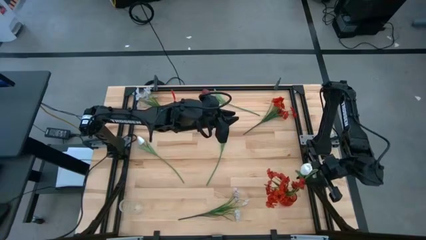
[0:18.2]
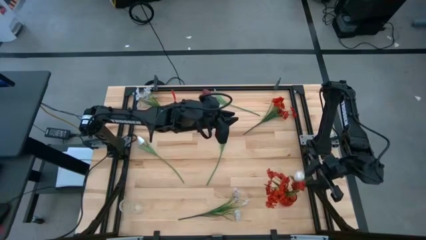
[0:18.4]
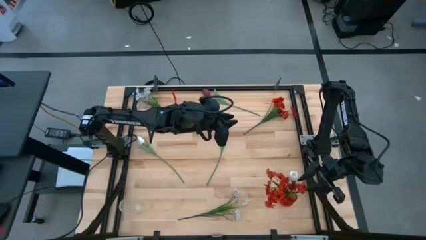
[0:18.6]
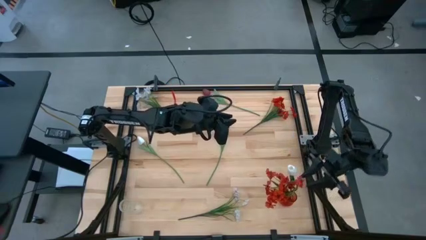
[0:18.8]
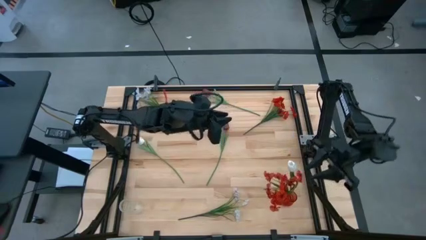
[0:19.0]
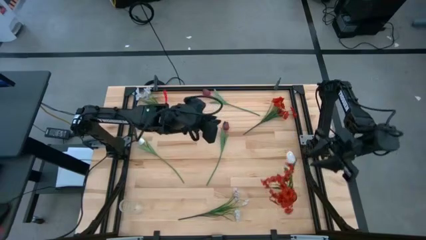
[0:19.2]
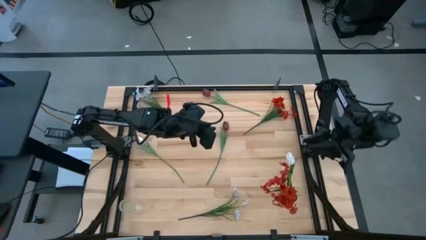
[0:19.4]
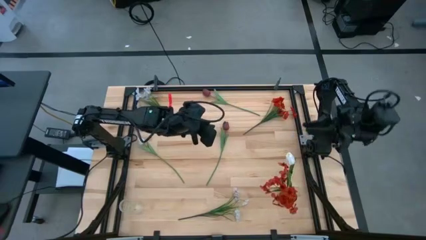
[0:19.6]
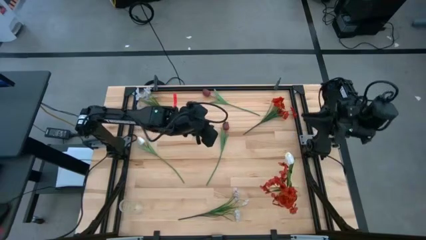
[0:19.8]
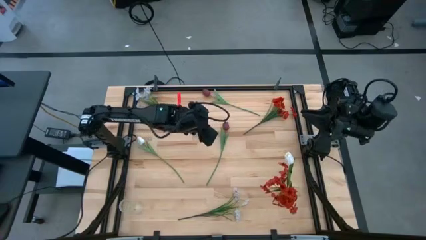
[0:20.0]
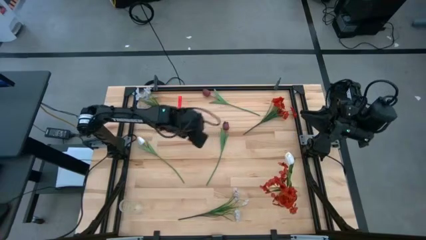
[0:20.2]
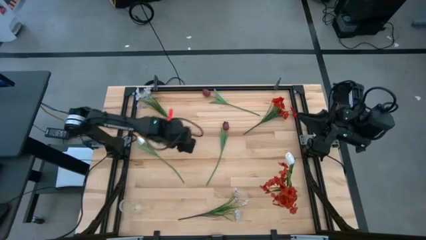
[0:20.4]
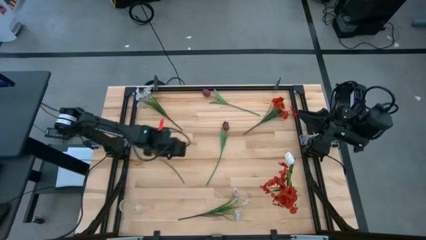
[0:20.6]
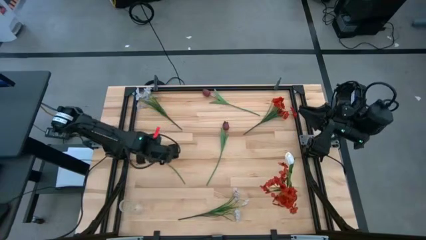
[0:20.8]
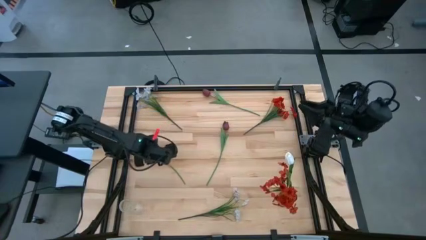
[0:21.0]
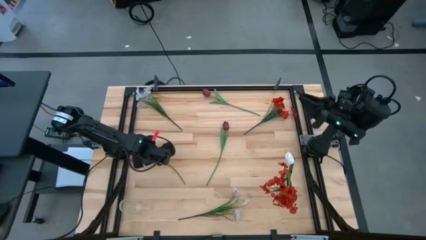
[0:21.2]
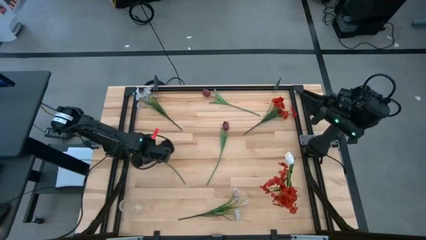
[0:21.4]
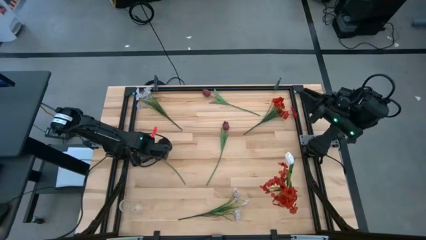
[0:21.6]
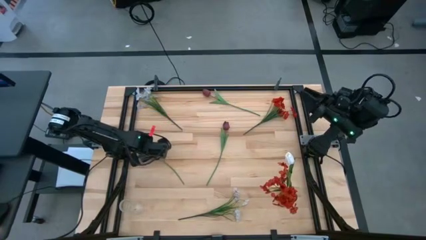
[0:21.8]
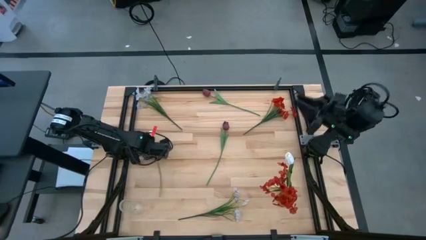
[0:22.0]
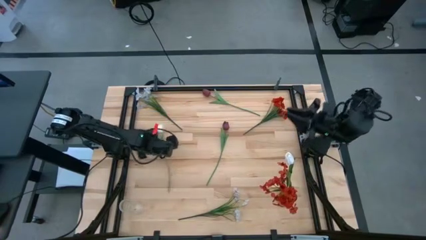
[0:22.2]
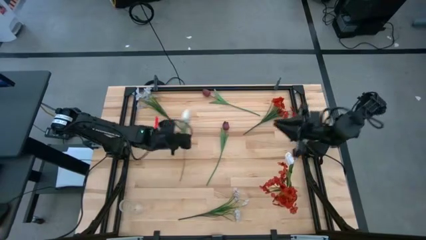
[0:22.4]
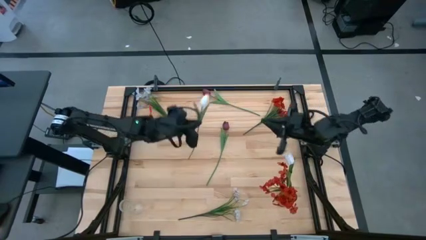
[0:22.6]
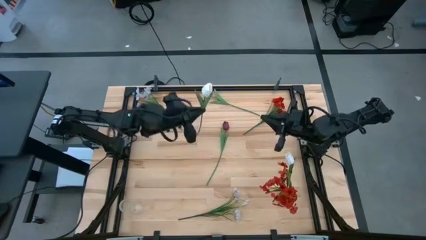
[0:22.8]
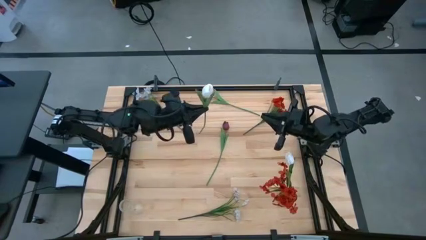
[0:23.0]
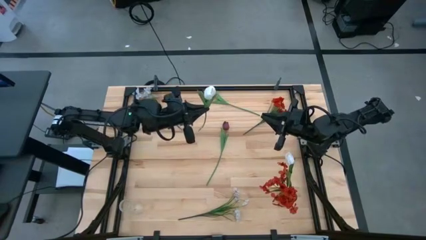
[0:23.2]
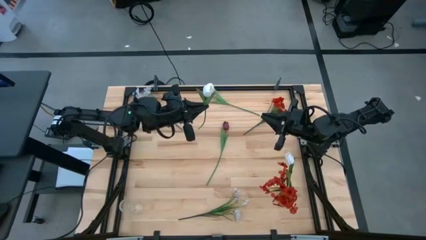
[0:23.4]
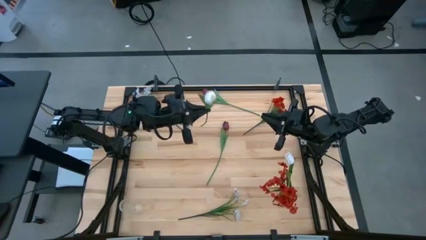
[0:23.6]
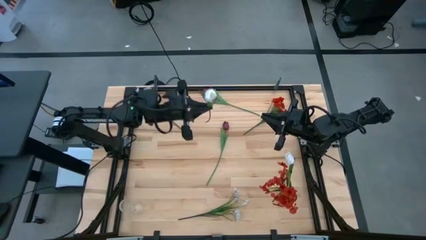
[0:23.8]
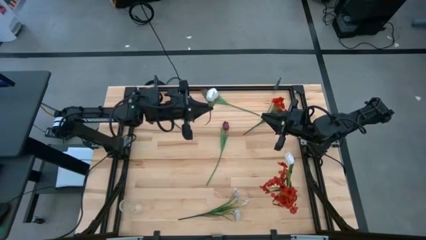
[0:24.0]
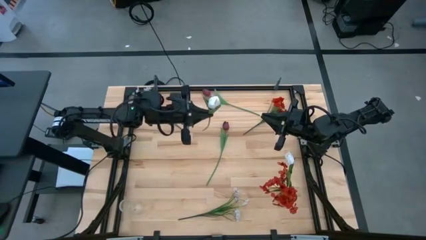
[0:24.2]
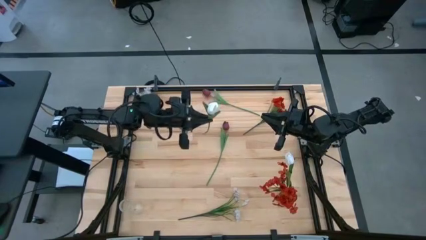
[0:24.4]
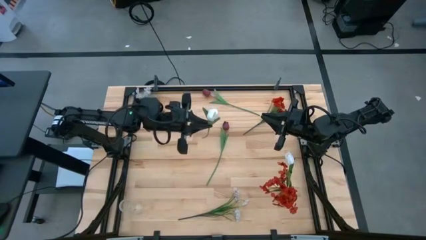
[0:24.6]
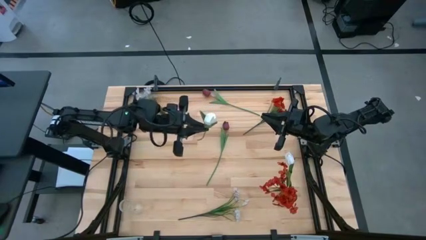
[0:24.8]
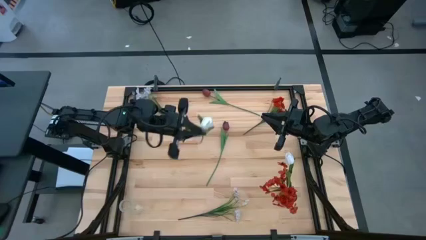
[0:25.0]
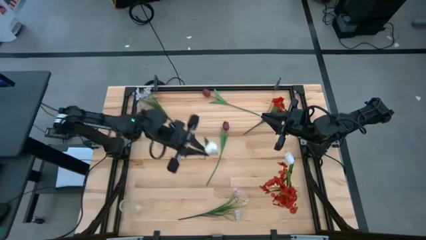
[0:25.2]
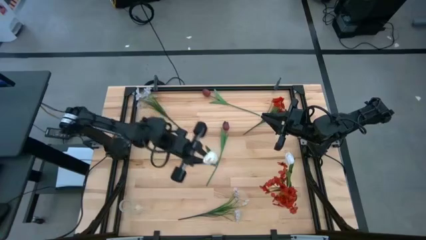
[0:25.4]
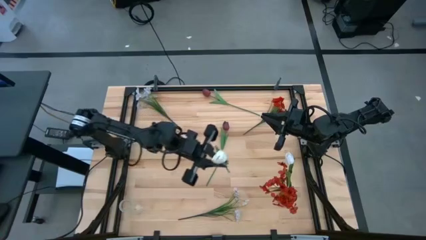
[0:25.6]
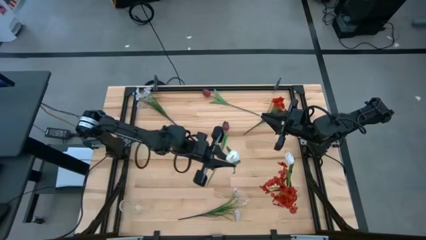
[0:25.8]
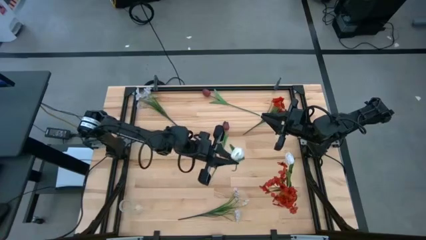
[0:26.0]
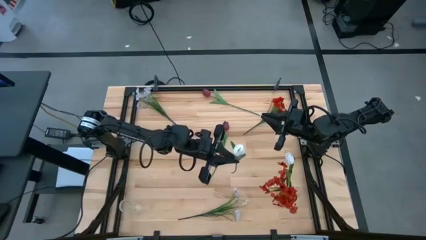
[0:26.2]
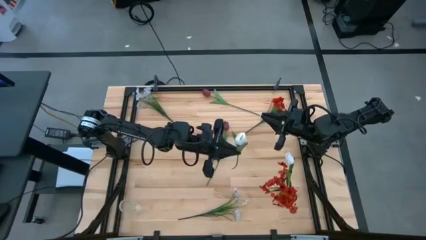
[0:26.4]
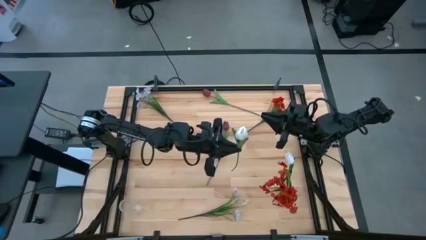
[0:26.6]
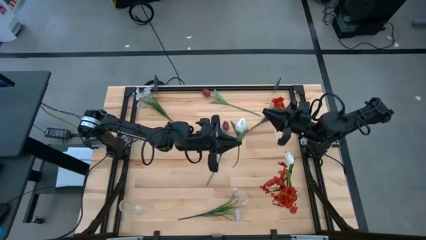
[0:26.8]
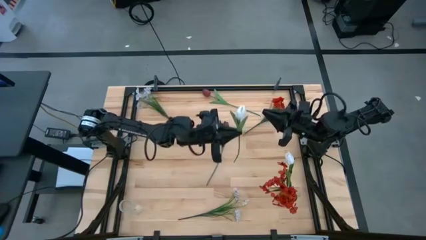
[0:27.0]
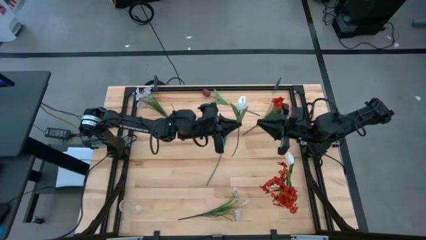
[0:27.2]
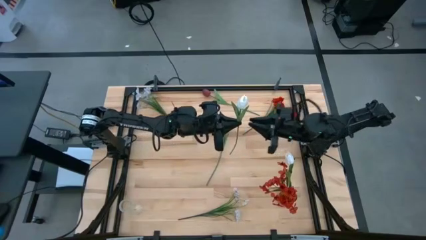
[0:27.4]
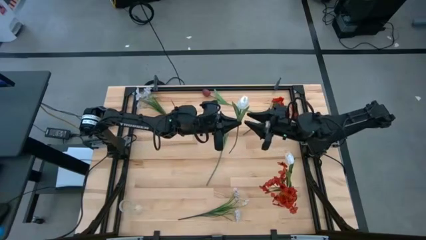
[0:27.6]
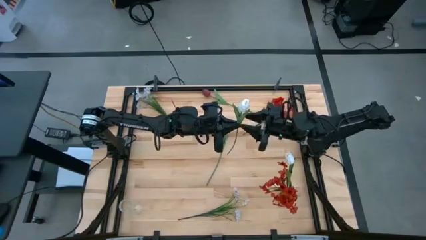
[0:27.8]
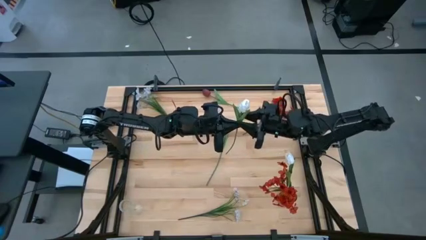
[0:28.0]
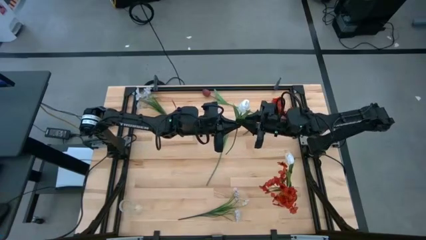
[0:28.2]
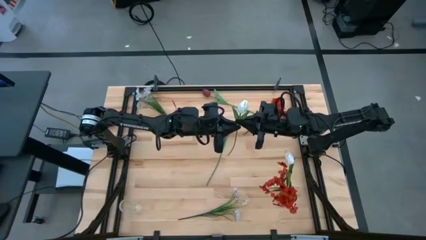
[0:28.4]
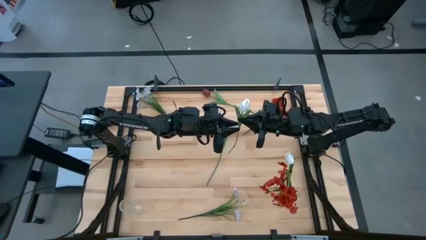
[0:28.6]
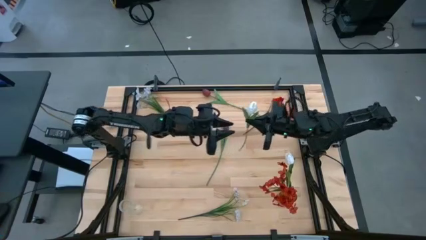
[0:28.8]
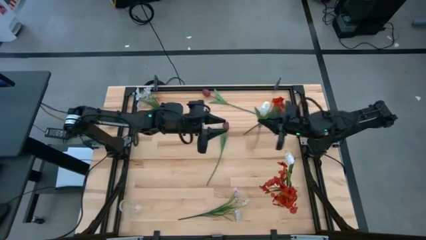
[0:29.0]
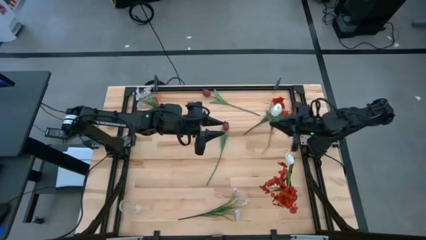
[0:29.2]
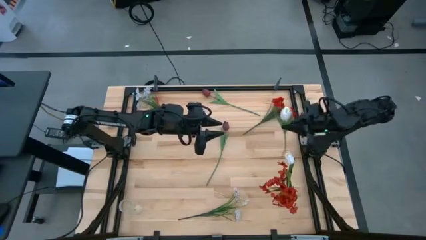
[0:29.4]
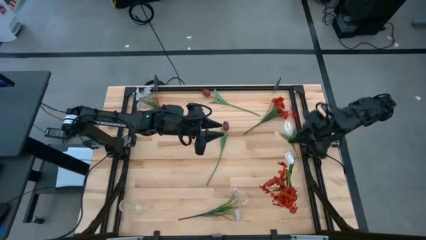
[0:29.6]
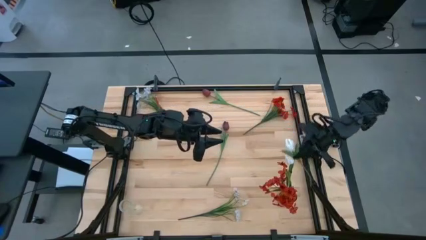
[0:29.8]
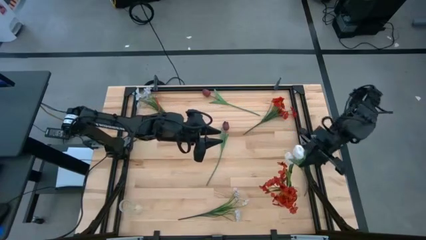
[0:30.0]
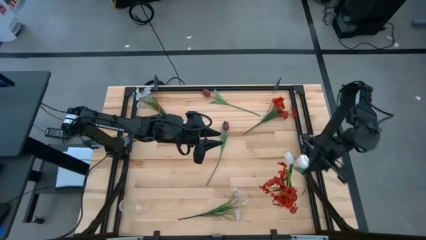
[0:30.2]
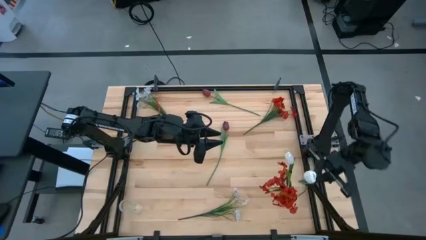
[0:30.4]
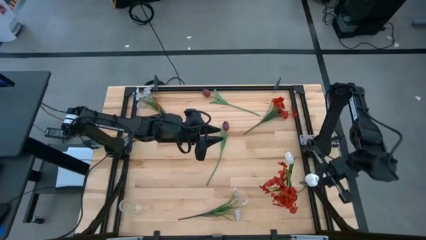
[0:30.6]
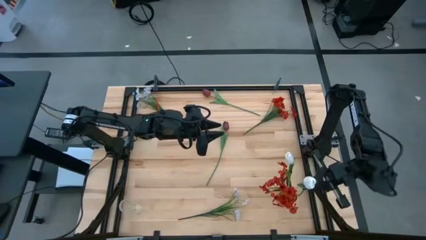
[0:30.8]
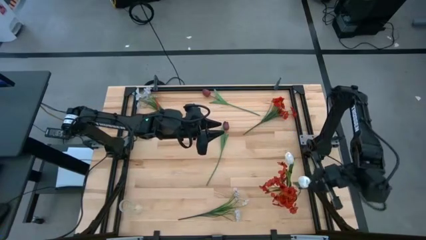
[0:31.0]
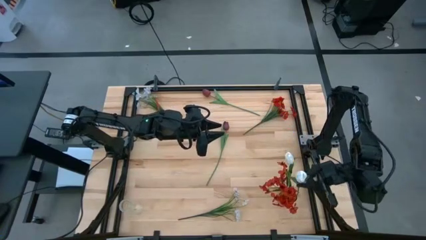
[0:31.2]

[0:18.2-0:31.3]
Task: Sort flowers into vase by color
Put the white flower into the red vase

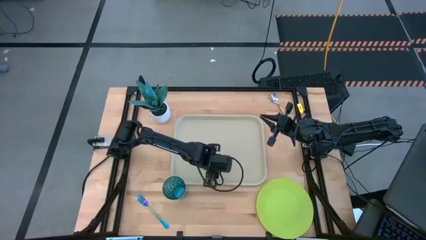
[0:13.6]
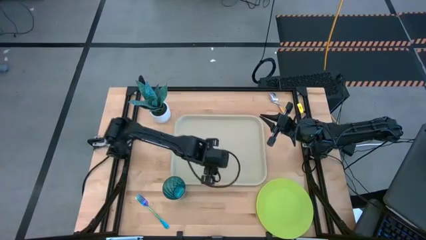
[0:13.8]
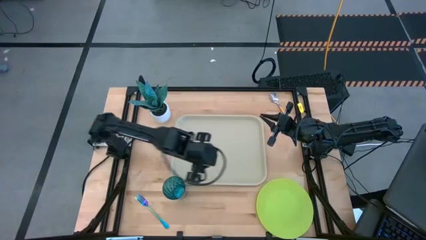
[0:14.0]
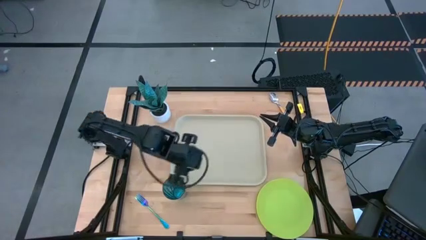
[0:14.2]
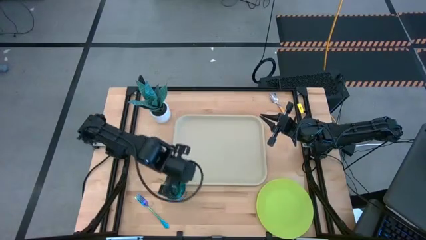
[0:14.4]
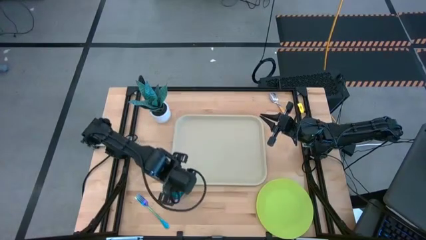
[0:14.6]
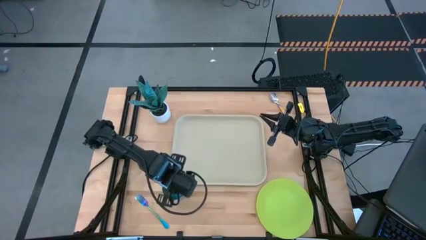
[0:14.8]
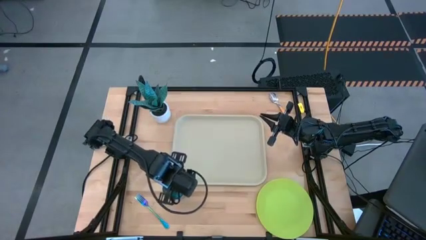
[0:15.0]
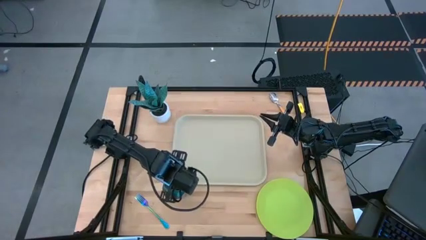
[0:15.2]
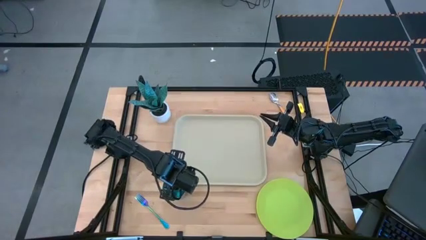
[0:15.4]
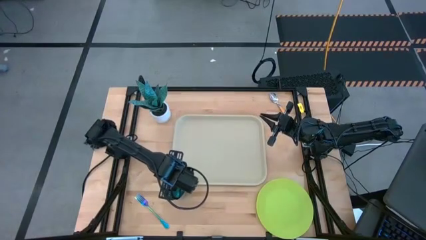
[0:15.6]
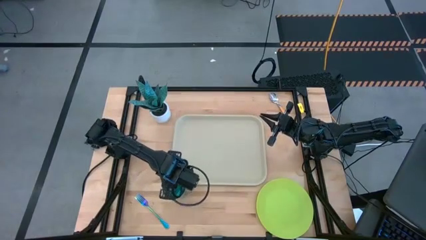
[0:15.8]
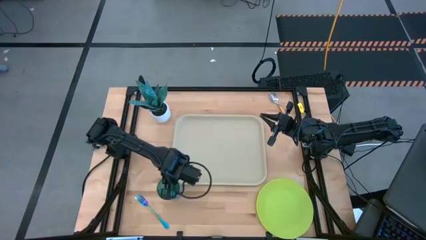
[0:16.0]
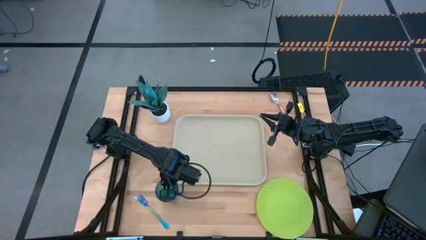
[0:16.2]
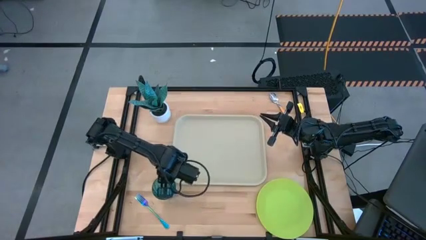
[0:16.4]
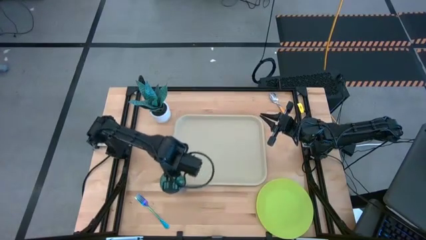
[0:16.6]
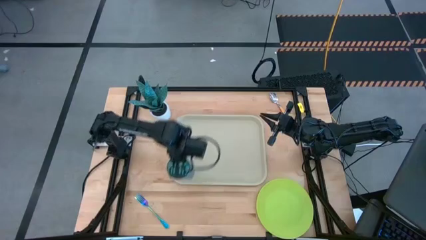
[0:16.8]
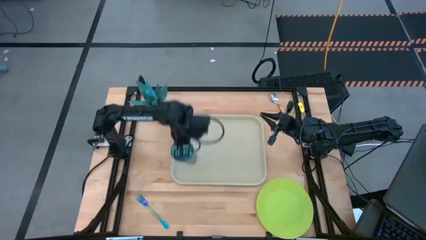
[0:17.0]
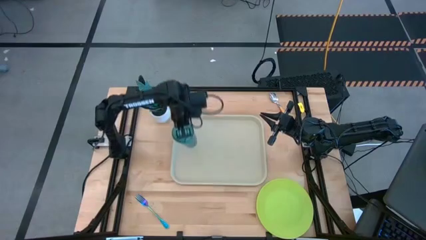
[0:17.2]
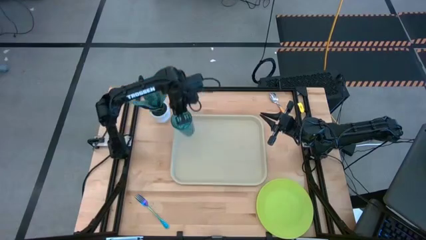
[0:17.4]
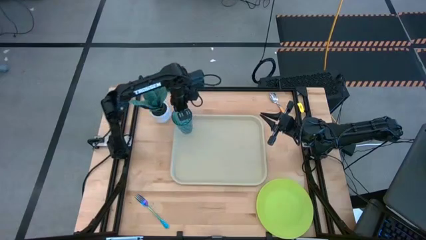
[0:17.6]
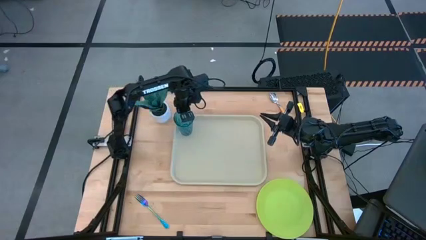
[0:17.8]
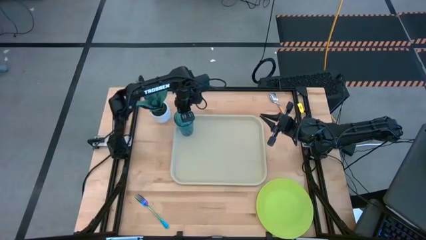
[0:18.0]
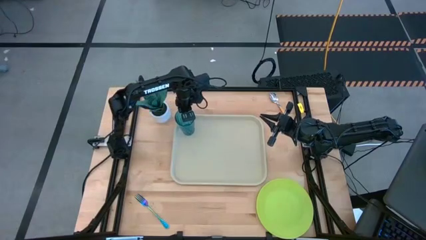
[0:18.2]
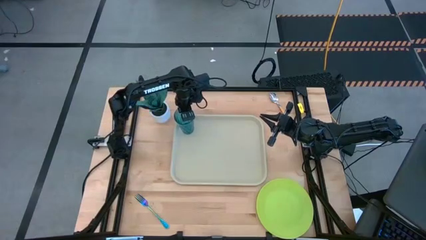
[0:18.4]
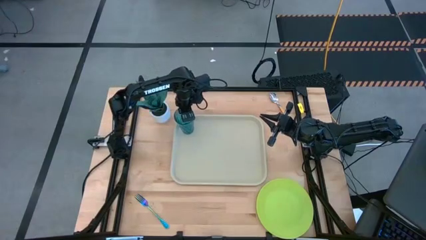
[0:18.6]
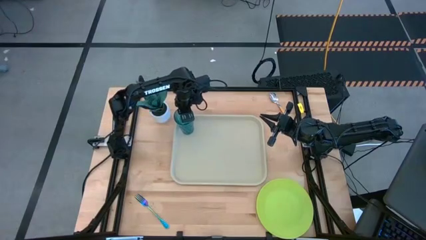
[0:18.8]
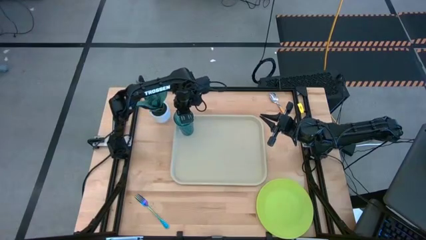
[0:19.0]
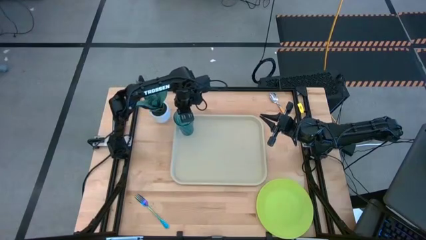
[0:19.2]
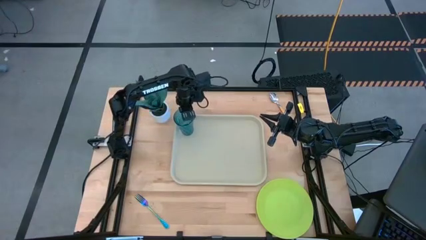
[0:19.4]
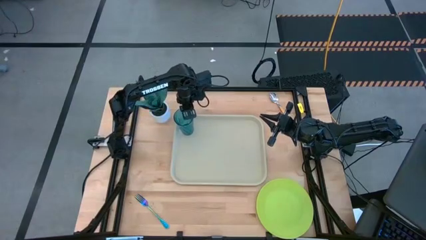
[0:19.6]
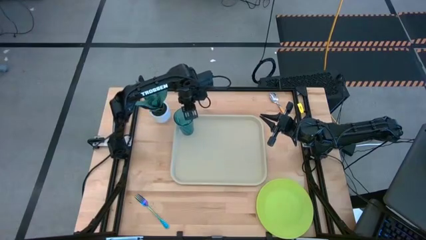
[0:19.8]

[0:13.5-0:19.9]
Task: Pick and place plate/cup/fork/spoon on tray
Put the blue cup to the top left of the white food tray
